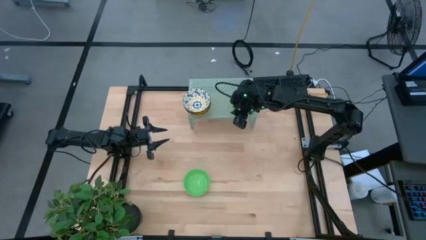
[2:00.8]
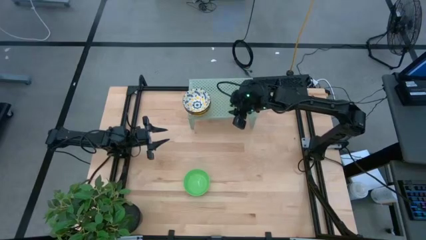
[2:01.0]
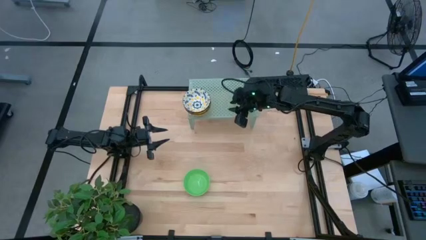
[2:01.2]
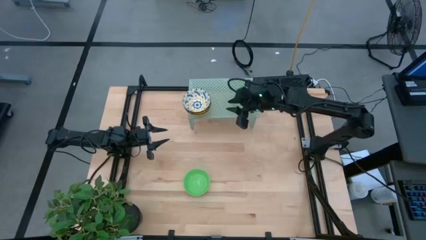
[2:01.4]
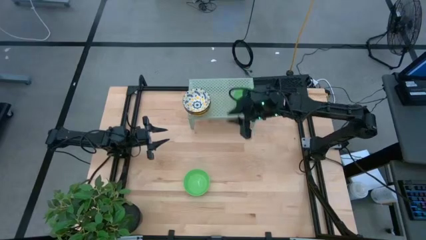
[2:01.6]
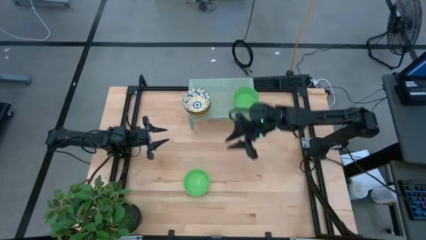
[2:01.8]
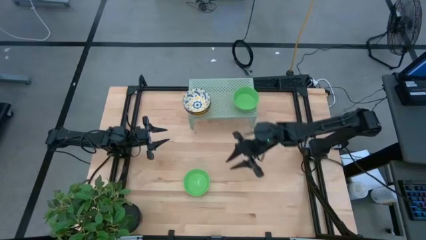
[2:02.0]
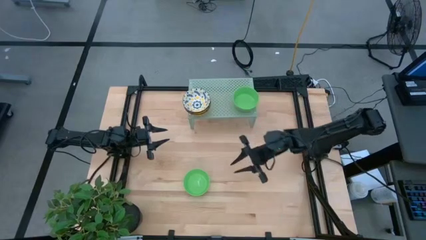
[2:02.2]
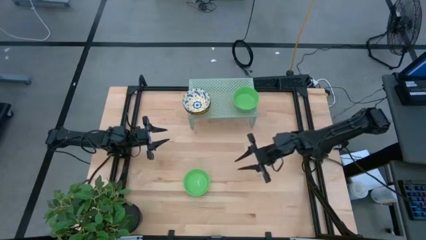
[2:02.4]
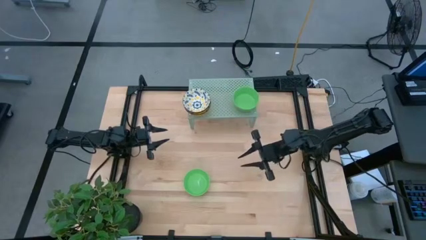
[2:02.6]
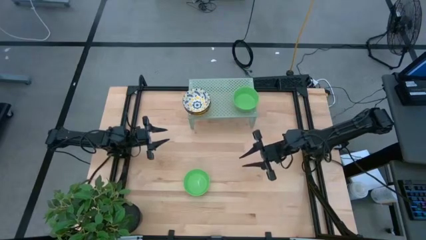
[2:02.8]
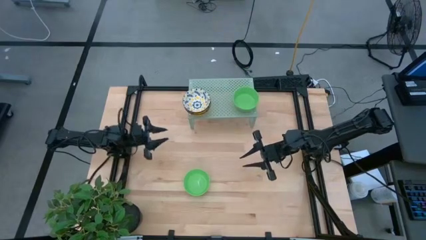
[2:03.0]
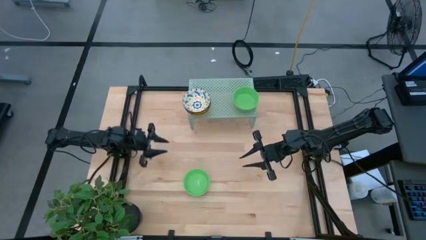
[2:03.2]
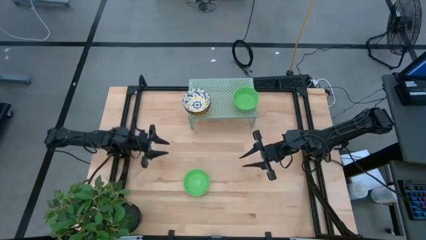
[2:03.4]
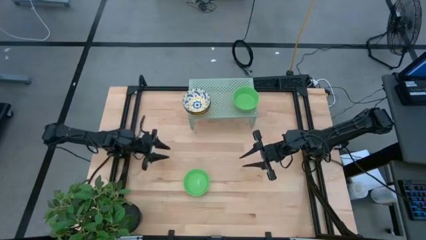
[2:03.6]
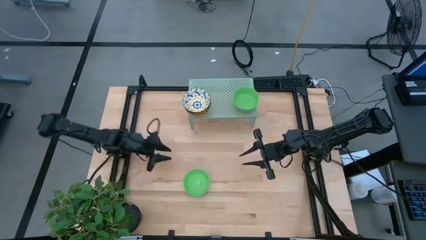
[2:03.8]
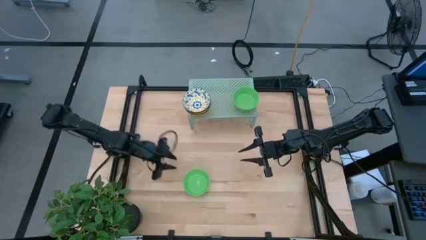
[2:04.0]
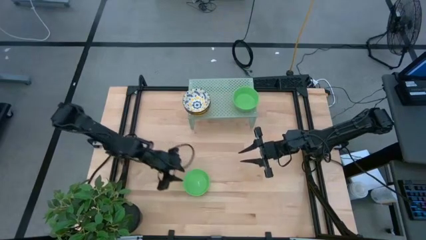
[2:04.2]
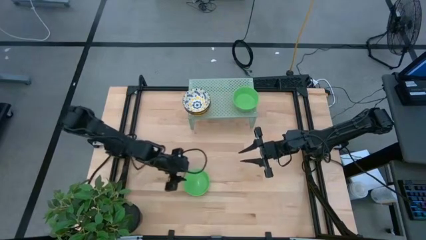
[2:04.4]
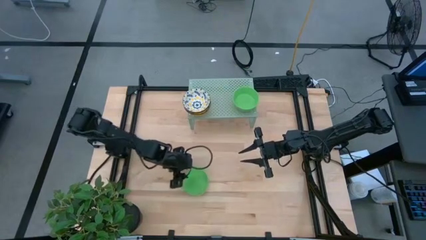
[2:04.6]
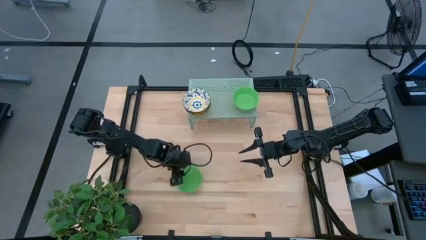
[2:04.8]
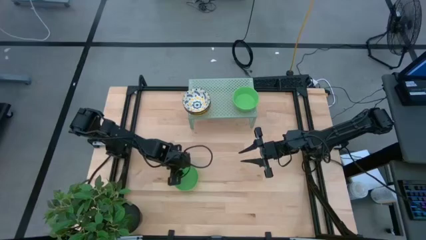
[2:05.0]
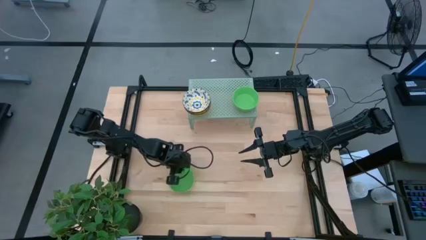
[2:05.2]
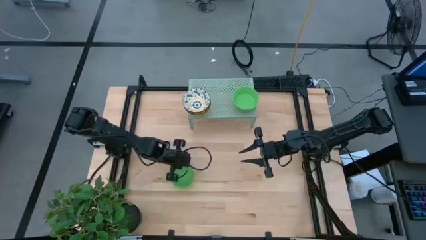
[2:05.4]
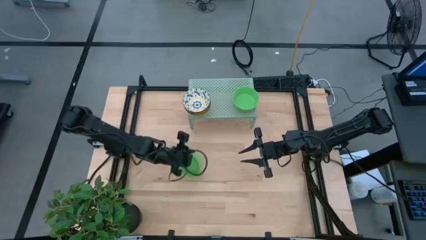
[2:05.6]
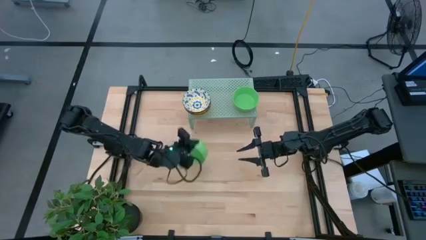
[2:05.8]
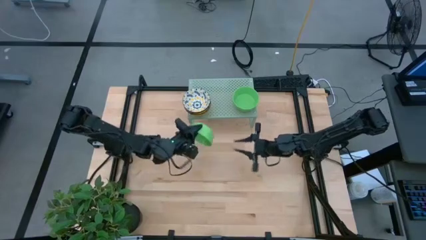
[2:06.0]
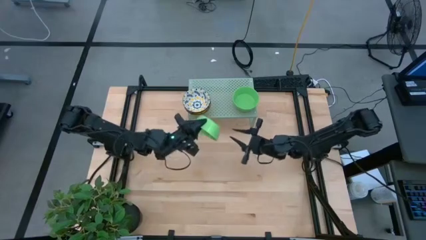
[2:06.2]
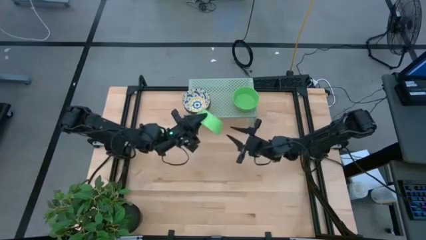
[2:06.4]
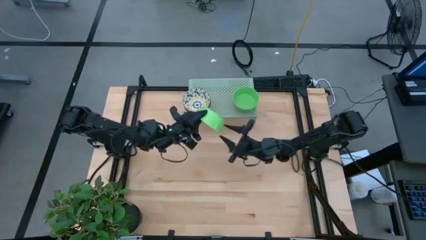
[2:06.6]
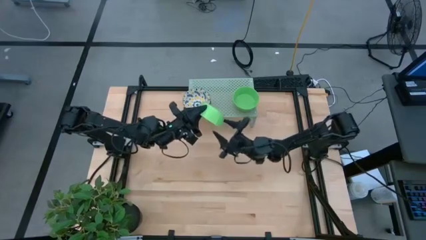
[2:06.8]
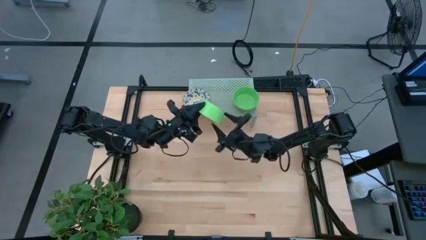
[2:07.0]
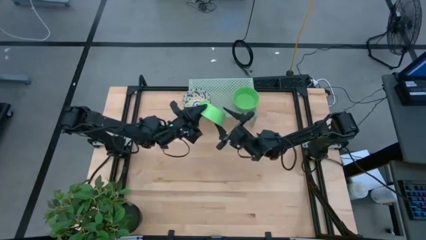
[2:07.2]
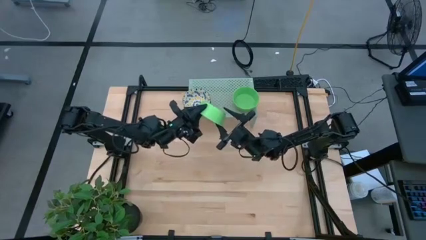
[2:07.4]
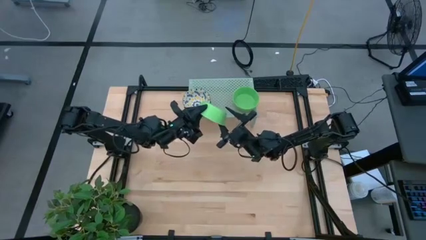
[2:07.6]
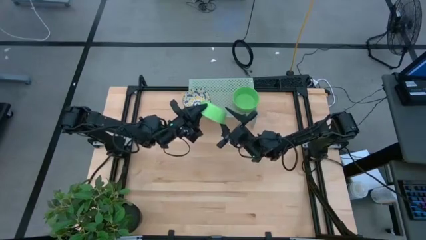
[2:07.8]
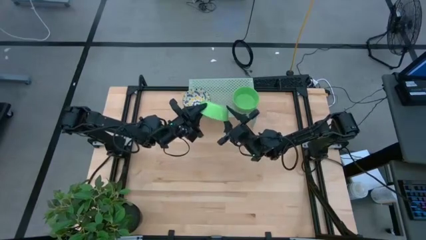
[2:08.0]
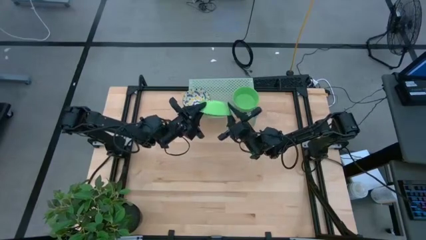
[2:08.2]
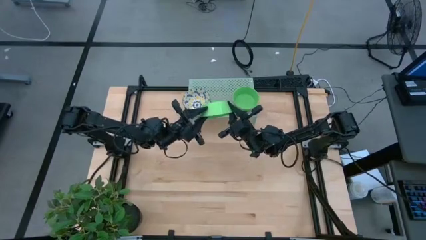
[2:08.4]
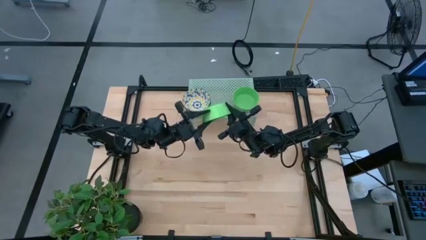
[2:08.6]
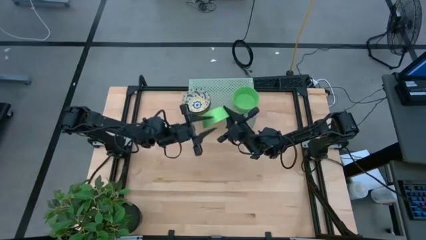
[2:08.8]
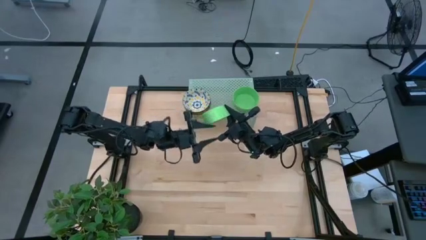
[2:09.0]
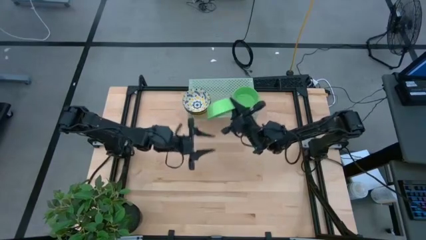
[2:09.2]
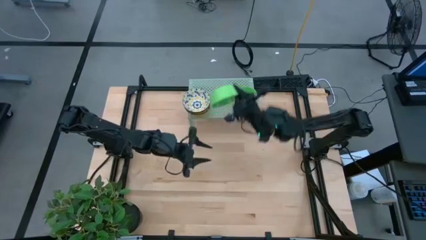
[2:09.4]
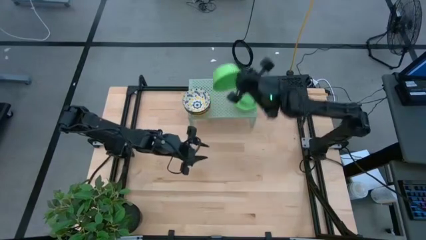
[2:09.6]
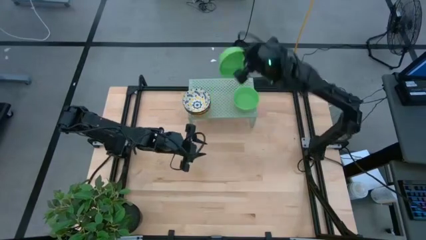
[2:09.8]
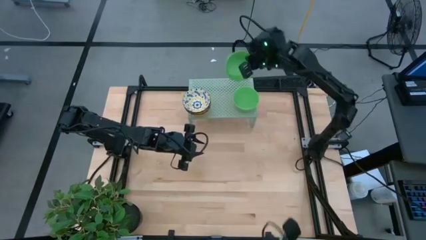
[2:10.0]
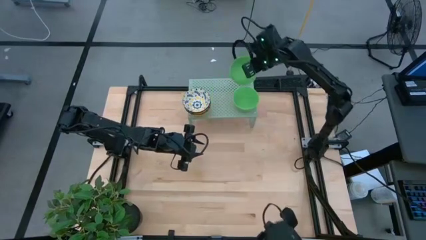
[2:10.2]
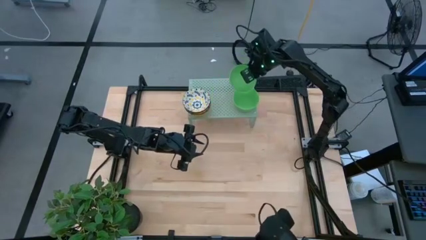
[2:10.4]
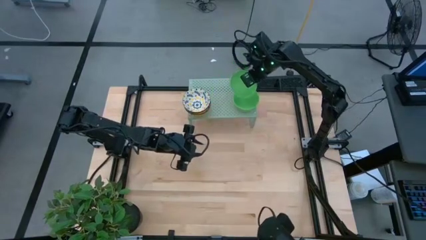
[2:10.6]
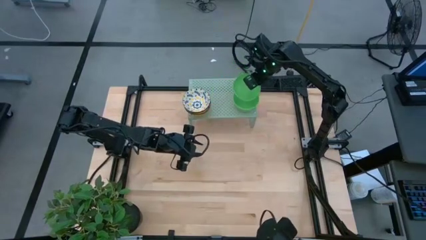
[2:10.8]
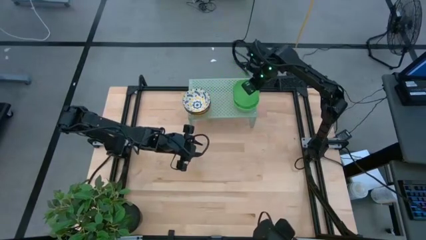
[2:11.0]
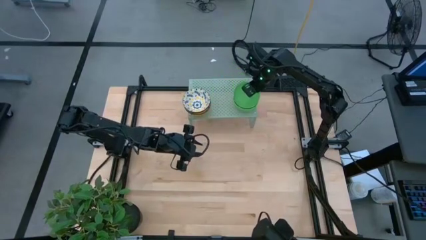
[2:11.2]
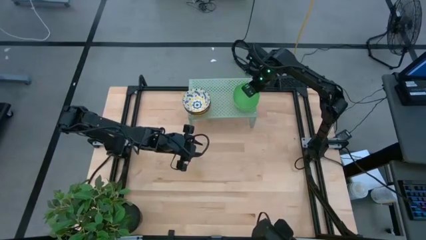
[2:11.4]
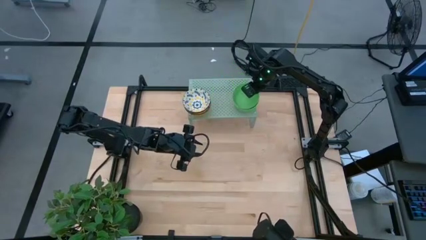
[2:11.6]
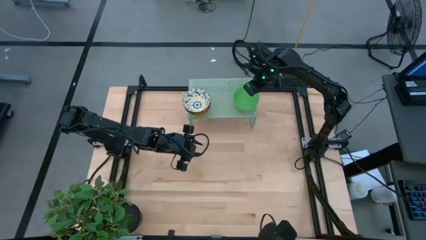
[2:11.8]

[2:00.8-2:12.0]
Task: Pick & Place Mini bowls
Stack the green bowl on top of the green bowl on the shelf

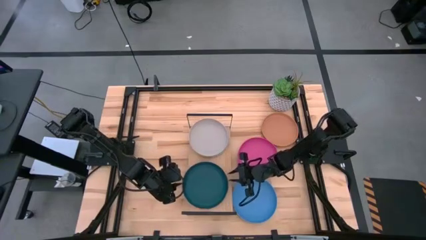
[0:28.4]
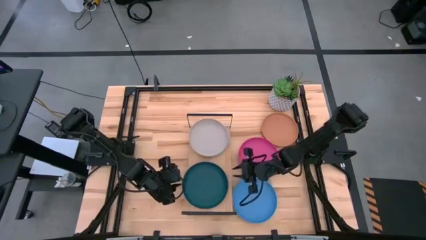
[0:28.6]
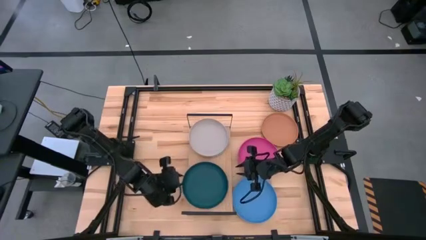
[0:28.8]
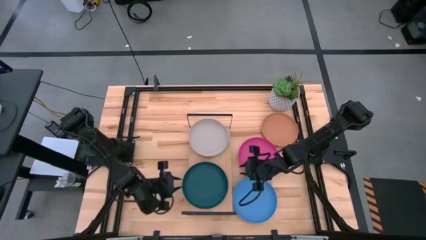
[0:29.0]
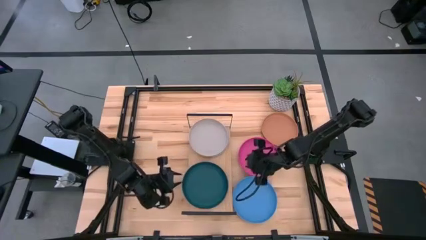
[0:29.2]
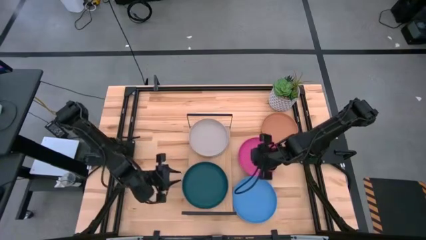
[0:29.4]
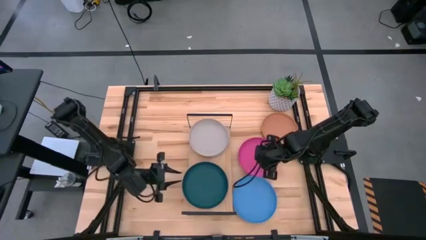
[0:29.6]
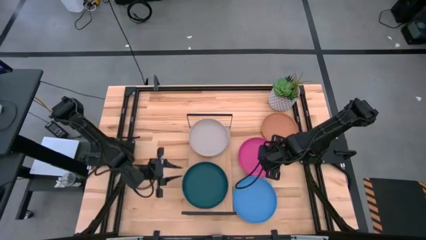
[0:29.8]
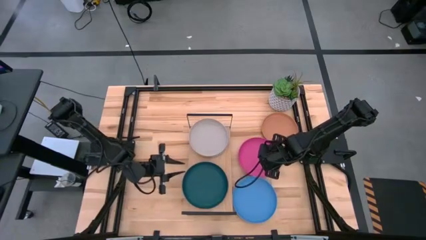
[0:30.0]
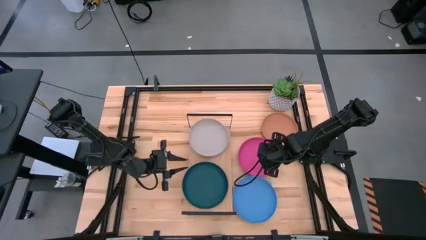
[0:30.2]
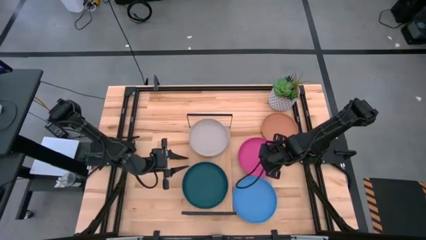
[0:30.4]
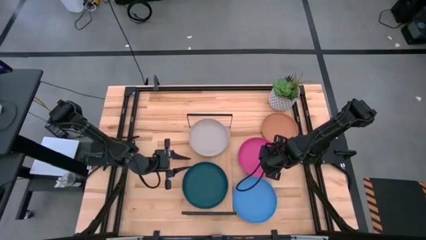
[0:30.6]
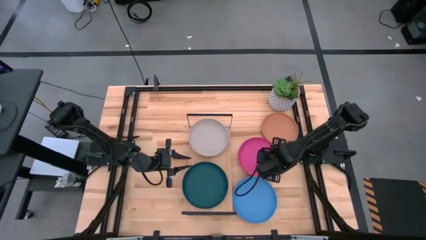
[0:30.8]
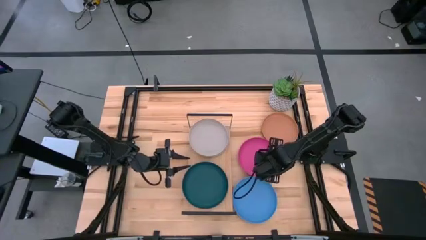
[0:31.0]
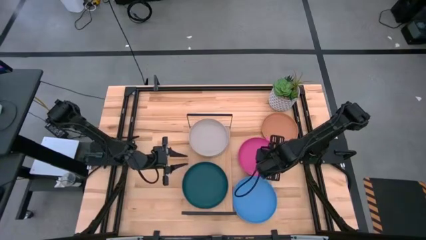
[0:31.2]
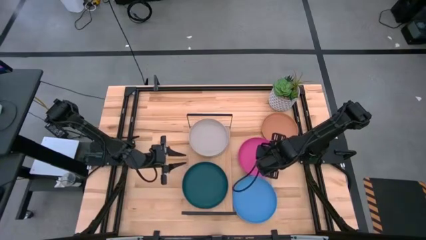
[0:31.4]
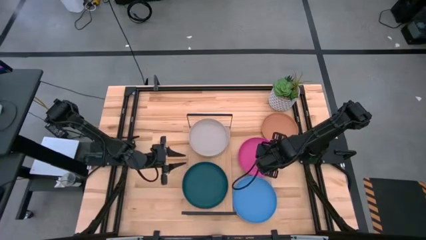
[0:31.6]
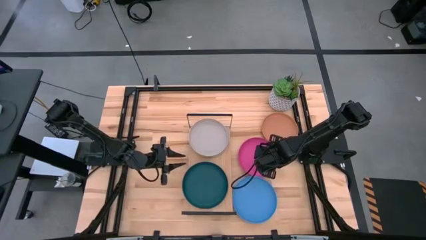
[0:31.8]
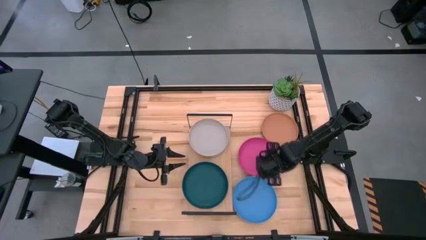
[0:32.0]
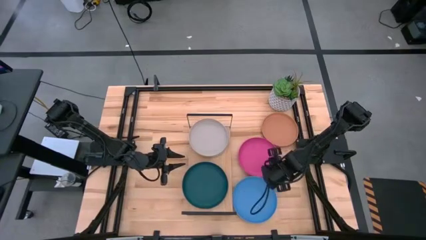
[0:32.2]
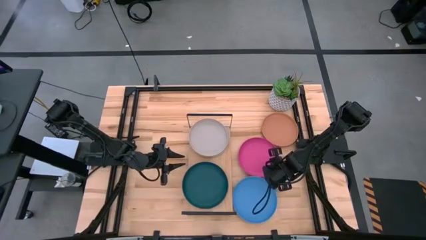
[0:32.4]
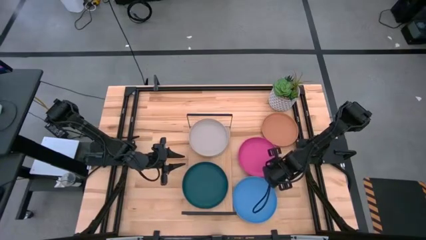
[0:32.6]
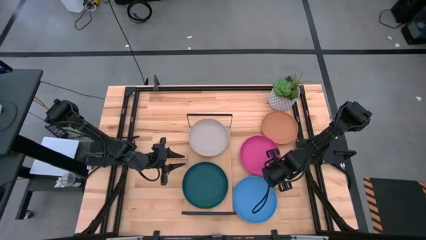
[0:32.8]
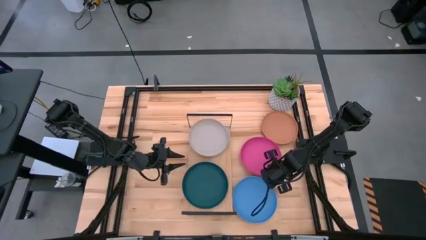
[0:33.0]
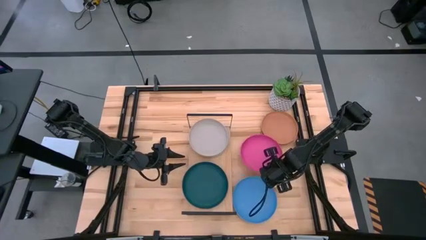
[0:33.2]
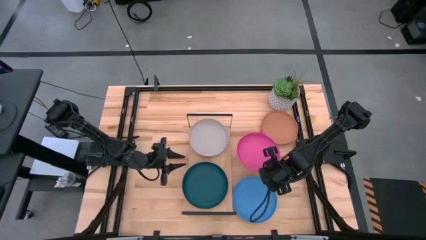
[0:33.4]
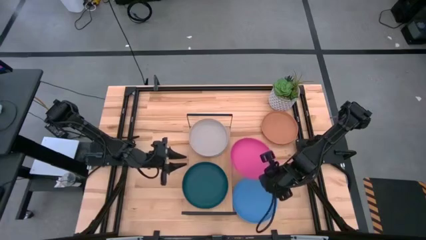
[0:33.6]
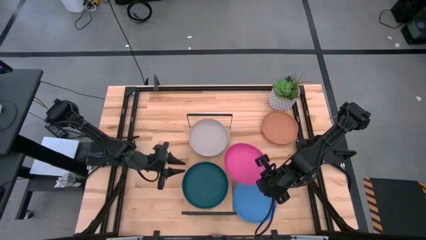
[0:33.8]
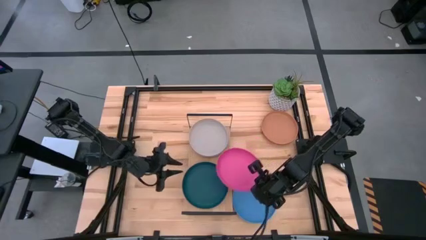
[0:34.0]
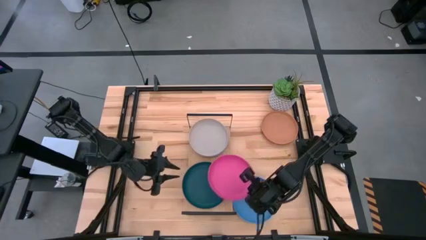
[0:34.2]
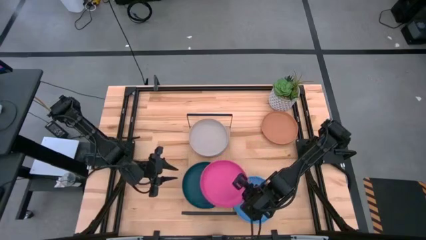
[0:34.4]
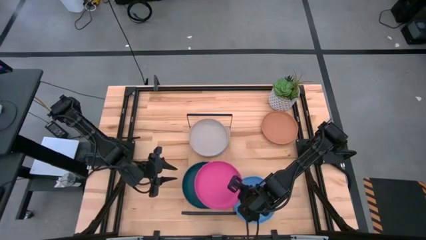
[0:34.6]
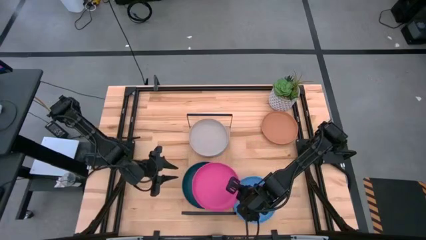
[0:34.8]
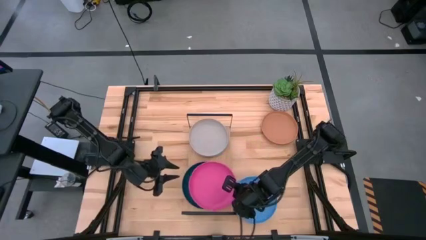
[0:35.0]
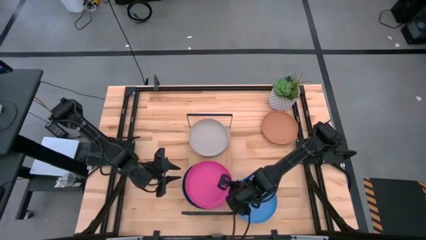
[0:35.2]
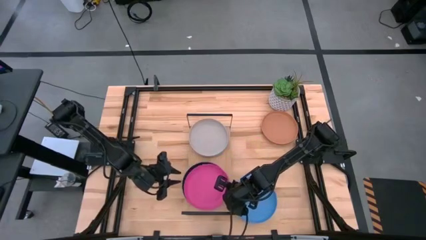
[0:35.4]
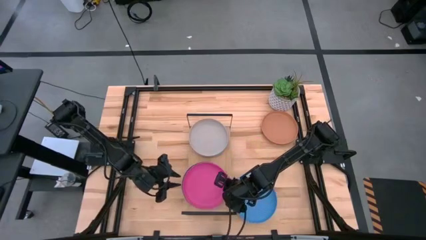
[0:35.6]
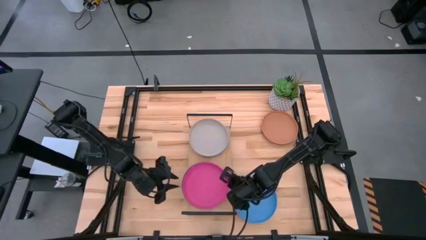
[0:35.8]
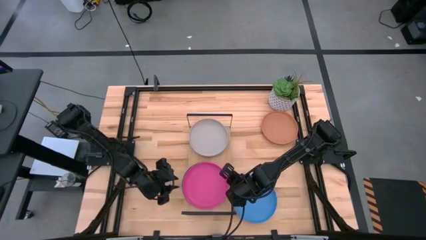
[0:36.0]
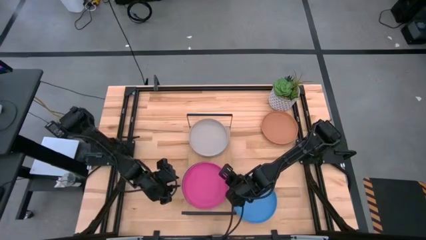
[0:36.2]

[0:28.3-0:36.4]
Task: Place and stack plates onto a shelf
Stack the pink plate on top of the dark green plate on the shelf
